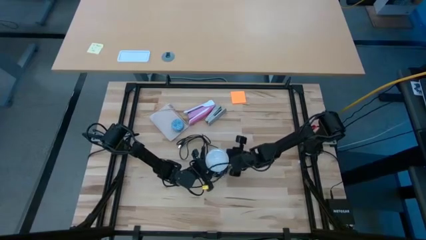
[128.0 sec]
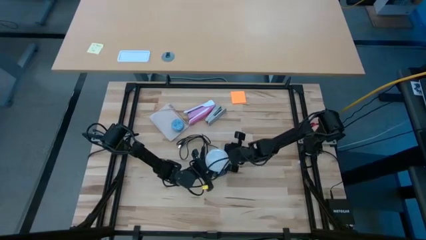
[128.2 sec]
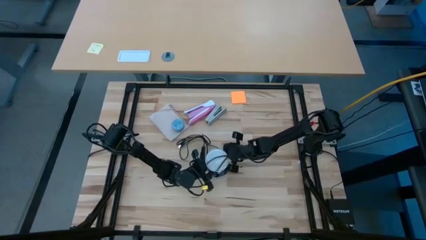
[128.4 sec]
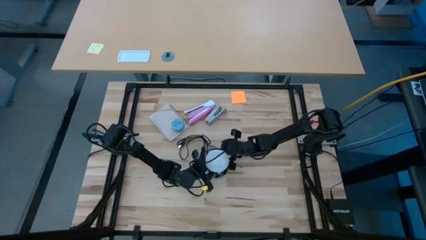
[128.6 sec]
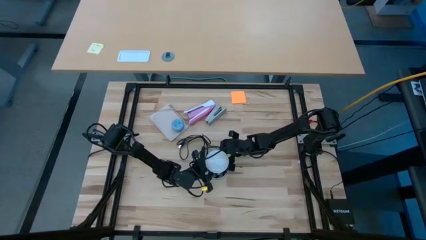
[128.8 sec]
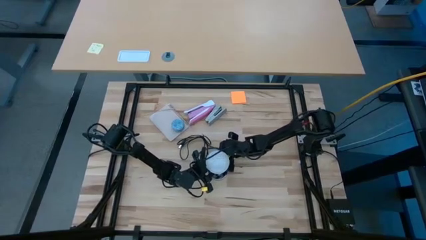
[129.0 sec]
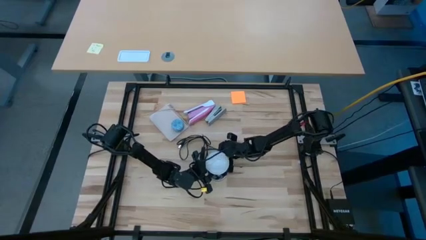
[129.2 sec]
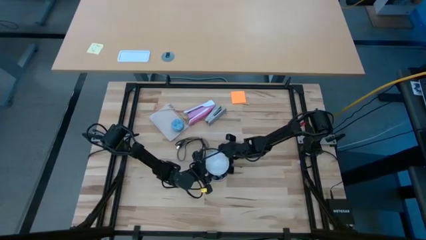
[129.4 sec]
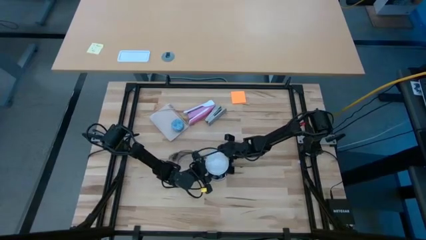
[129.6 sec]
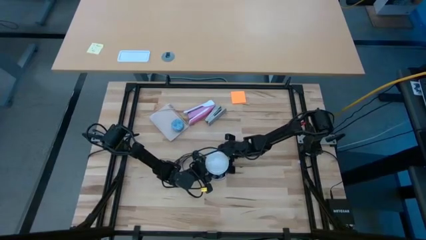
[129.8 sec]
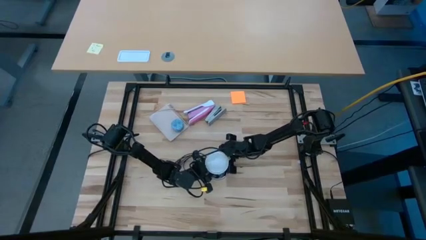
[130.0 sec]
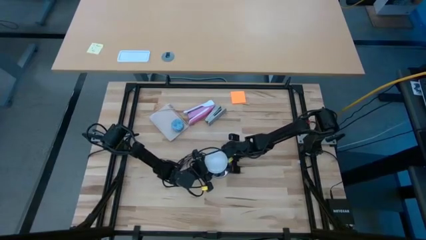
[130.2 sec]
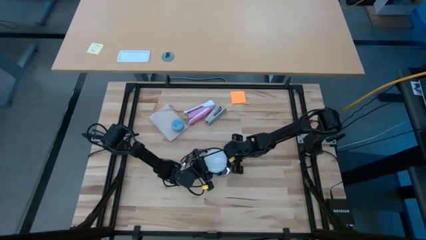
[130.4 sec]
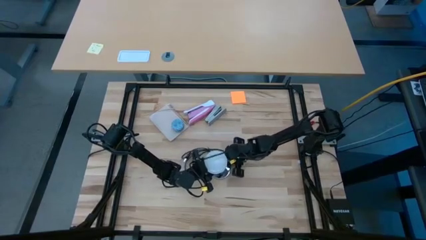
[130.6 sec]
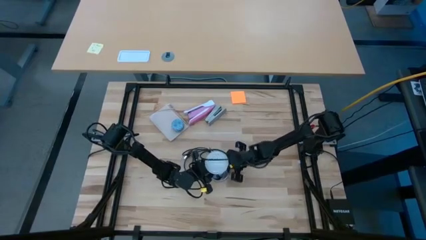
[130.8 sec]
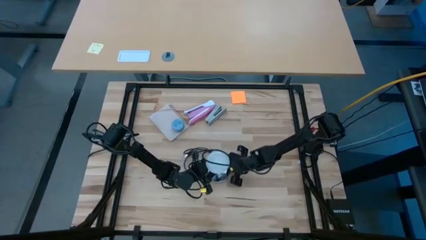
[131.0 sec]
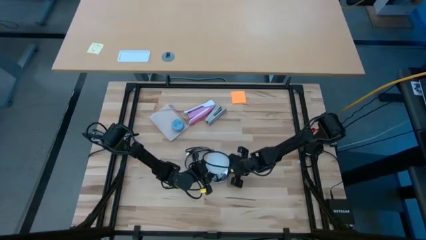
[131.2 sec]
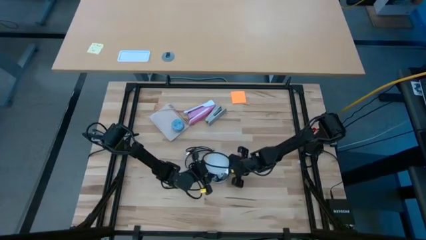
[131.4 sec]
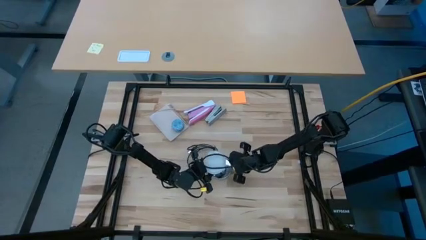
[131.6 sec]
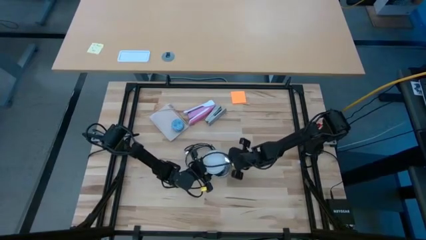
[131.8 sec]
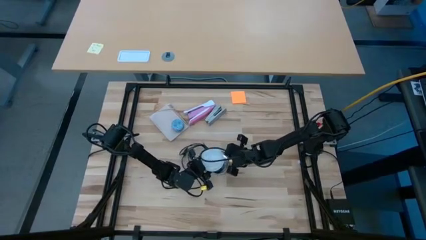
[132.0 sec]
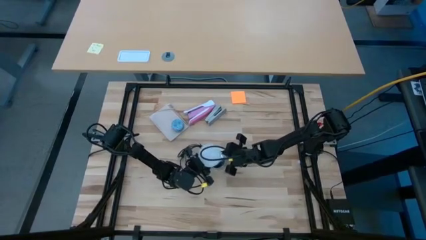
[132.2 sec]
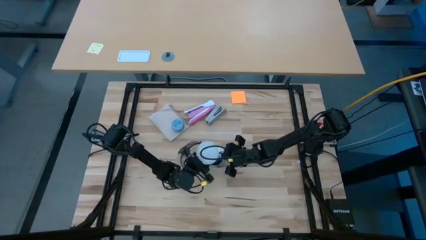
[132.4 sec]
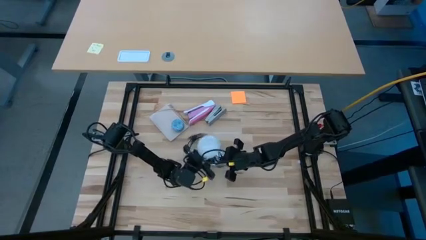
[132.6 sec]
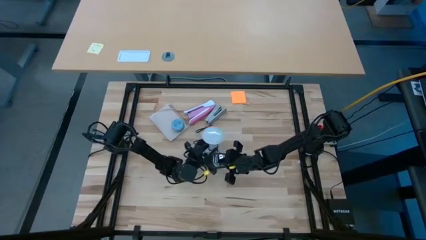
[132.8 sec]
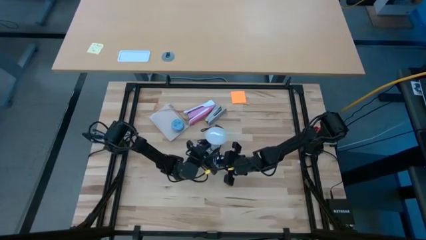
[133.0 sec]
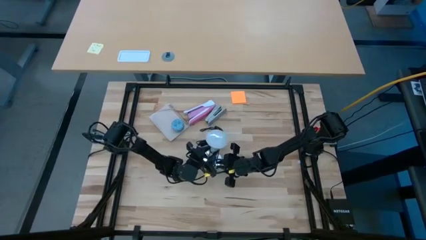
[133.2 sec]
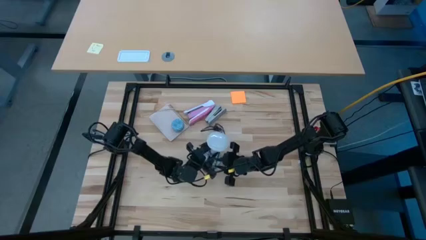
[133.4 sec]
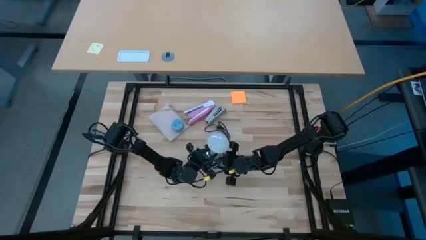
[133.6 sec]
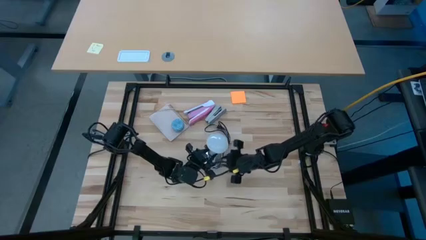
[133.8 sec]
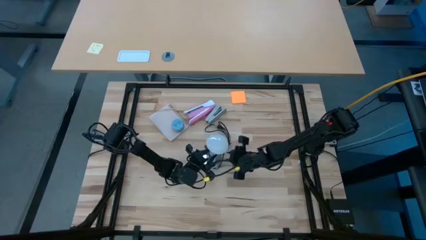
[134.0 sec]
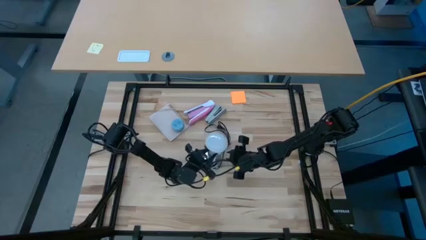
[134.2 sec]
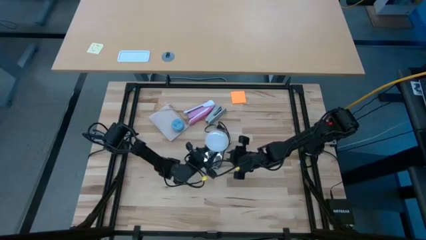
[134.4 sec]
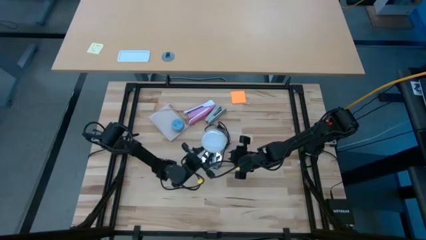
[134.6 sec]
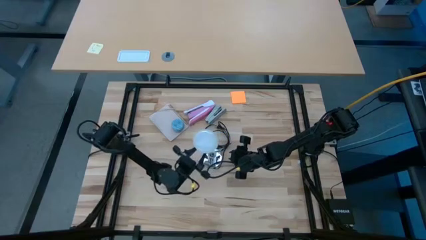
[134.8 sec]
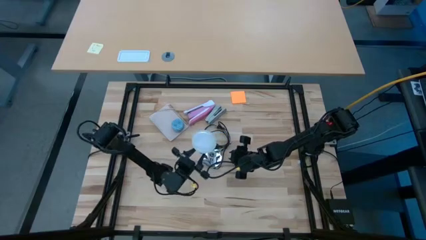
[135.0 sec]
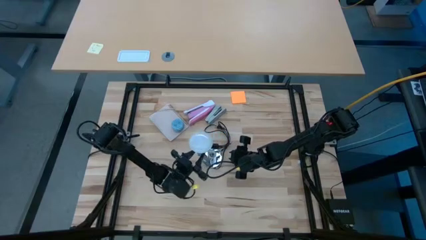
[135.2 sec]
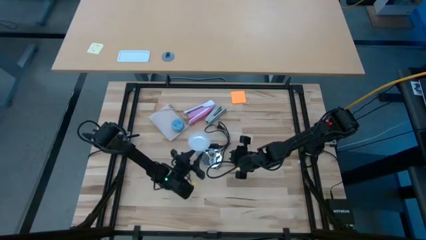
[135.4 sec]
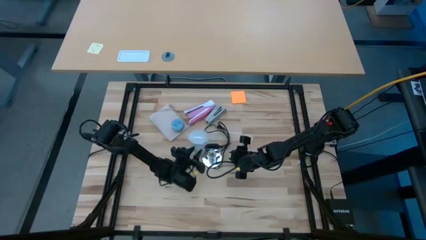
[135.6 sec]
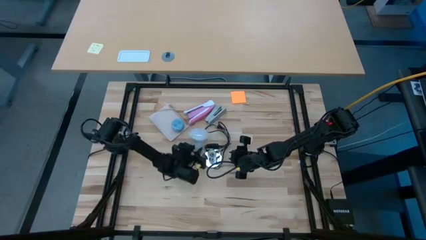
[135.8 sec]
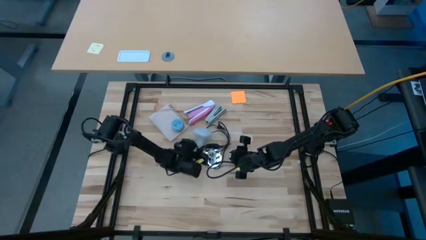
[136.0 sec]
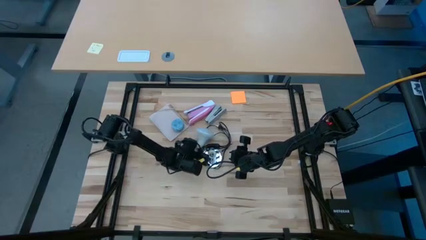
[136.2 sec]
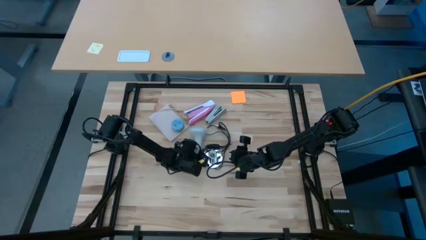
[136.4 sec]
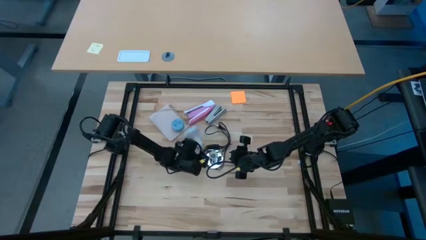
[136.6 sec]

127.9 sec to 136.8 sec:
Task: Screw lightbulb
Remove the white lightbulb from the silver desk lamp

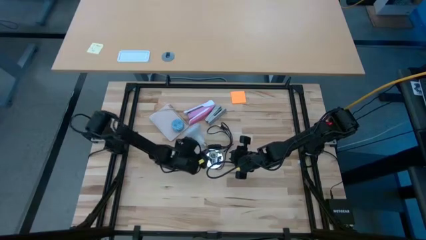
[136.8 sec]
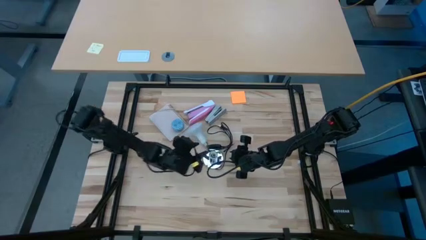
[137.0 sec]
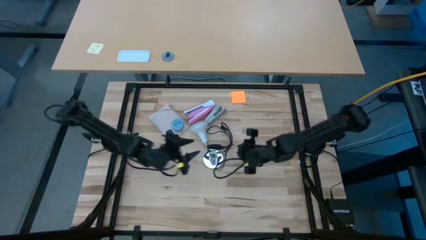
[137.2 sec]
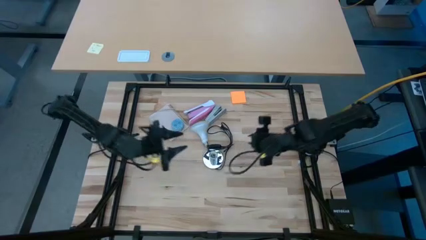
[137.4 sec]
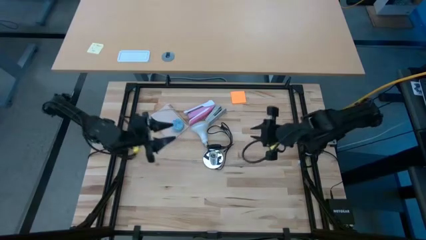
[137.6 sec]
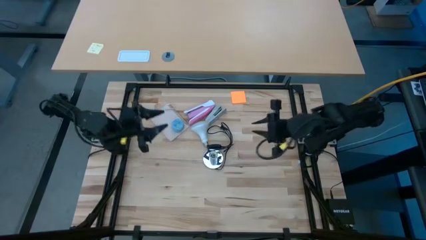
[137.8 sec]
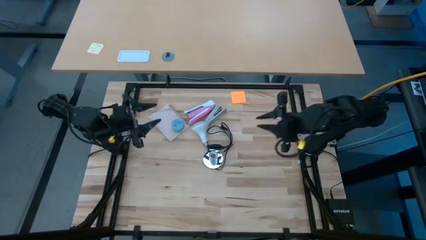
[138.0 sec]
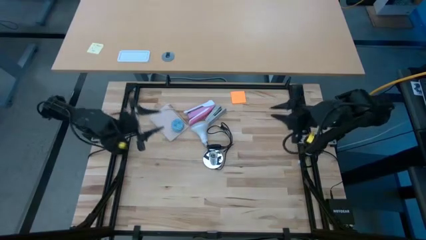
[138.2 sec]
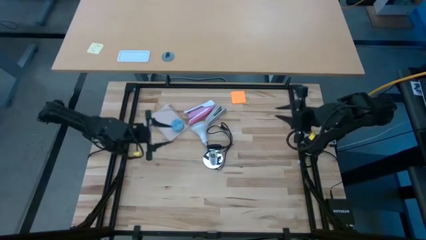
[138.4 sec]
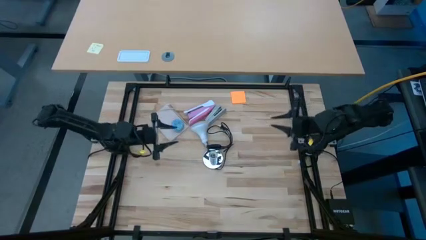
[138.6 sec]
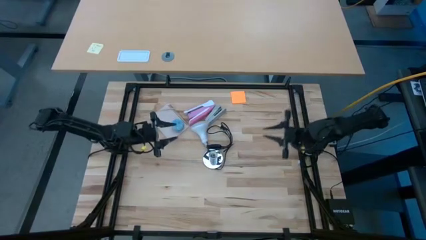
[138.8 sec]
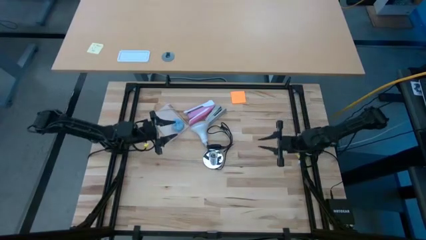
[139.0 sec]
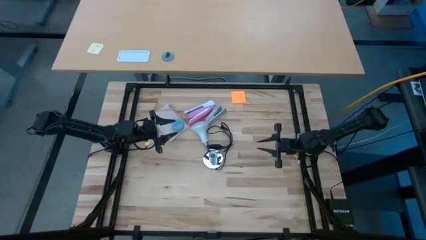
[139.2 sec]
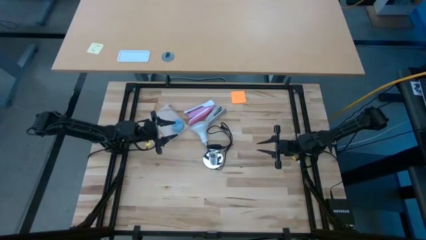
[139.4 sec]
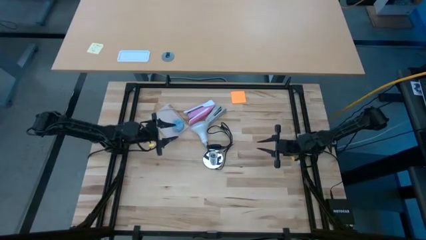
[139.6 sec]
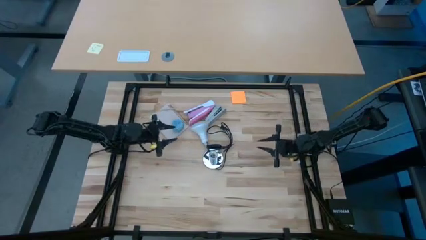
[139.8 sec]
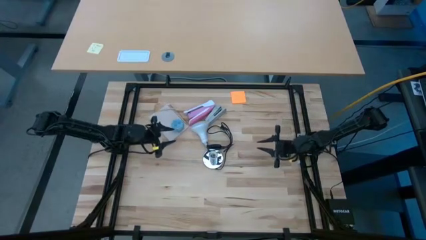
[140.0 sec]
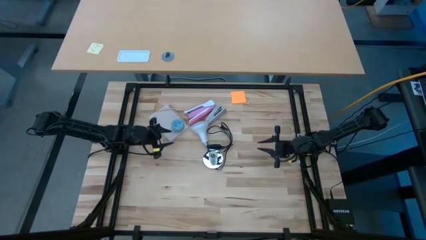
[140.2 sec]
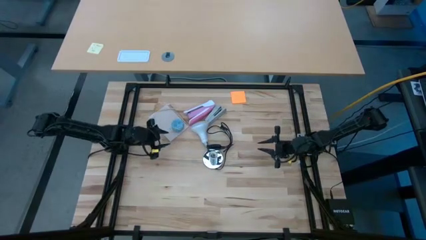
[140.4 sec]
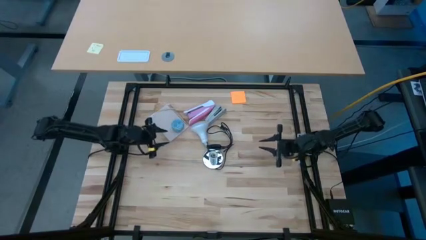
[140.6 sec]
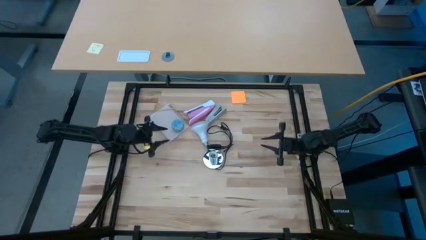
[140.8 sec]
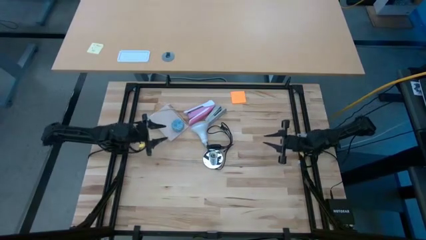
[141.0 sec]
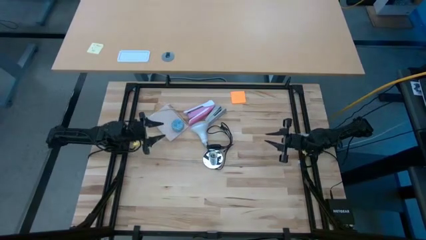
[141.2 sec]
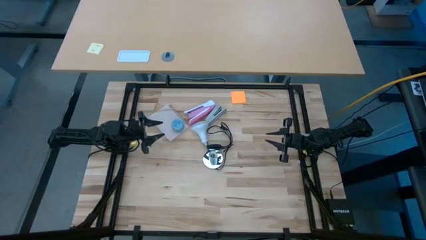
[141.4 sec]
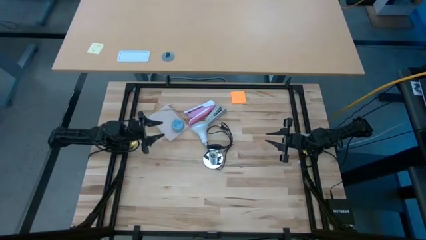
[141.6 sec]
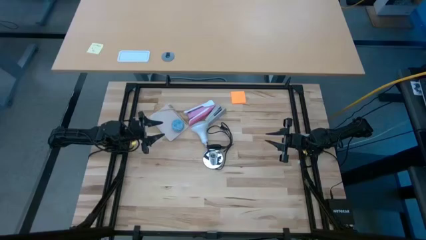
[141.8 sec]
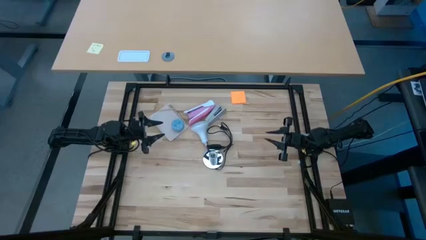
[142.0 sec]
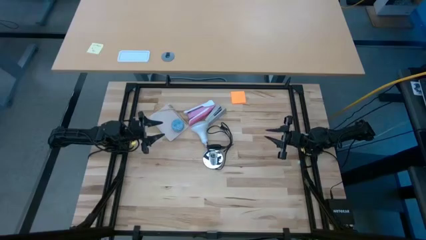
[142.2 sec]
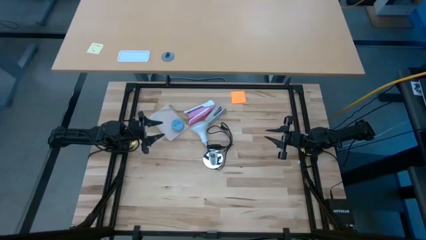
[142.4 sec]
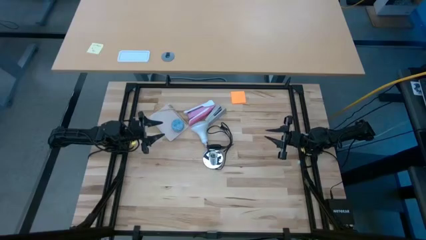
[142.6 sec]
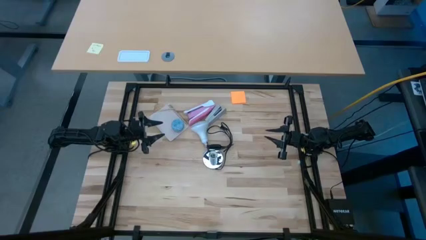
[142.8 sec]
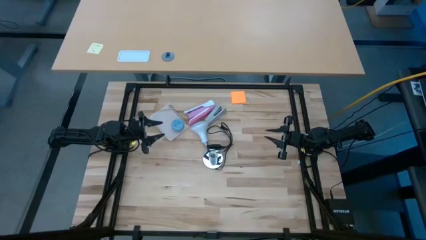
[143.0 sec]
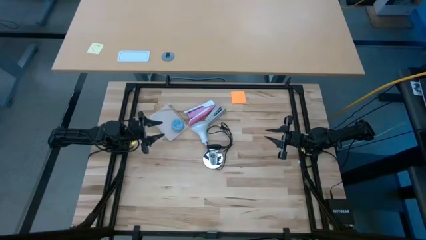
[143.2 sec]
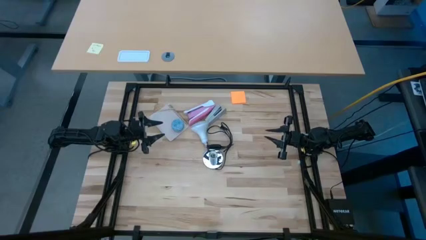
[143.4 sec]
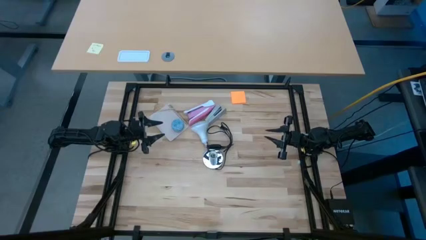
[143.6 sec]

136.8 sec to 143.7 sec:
Return to Home Position
